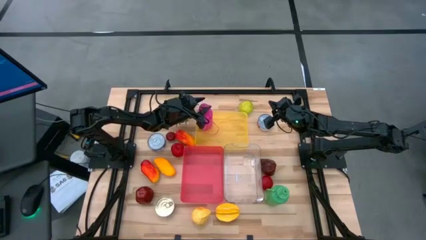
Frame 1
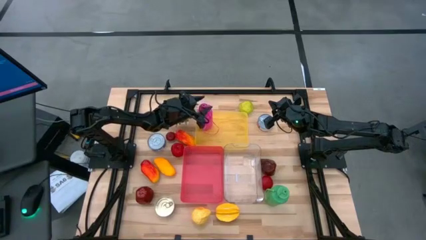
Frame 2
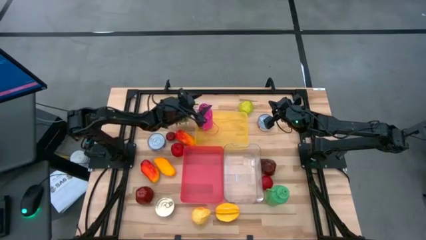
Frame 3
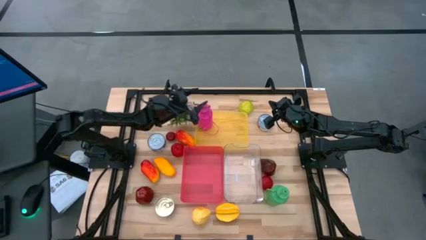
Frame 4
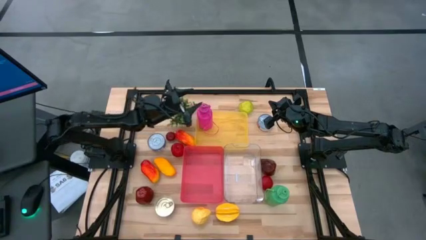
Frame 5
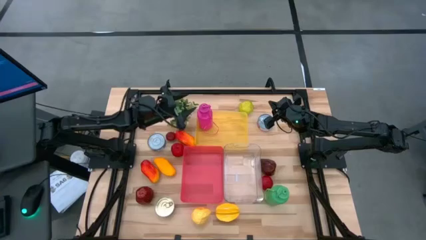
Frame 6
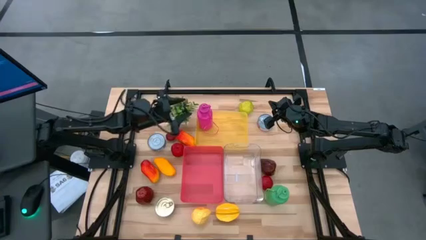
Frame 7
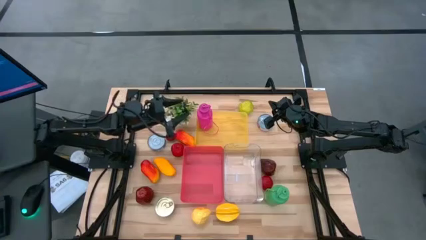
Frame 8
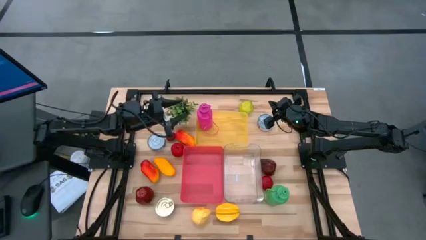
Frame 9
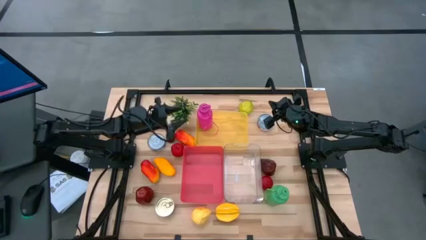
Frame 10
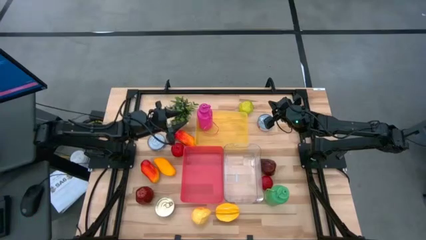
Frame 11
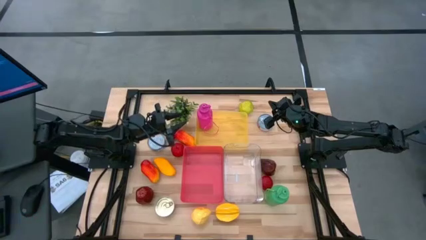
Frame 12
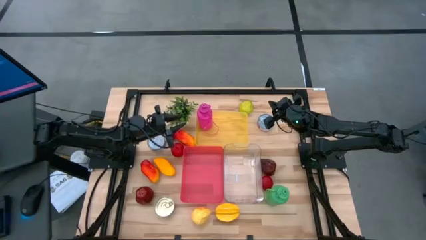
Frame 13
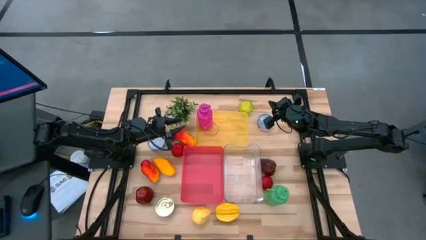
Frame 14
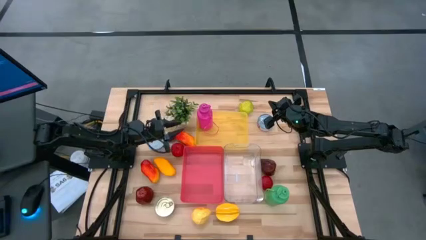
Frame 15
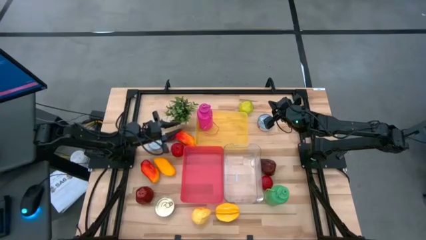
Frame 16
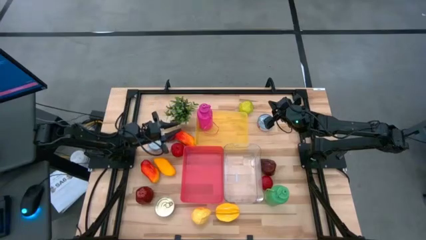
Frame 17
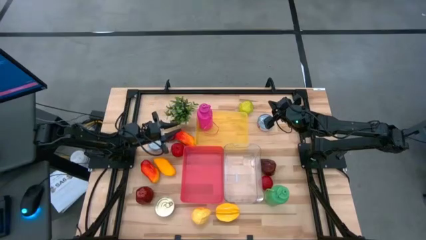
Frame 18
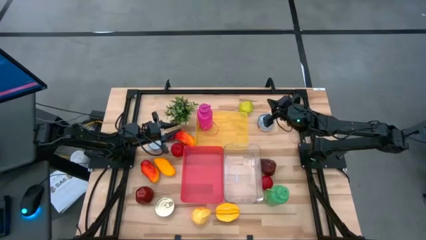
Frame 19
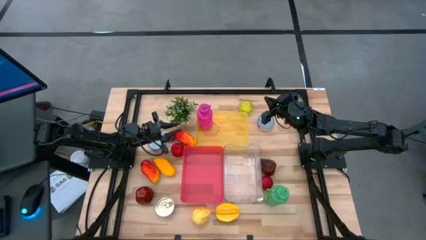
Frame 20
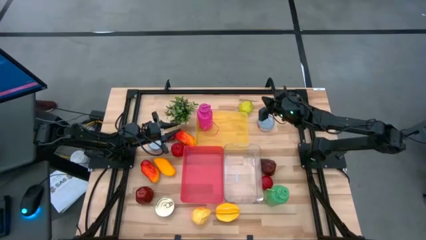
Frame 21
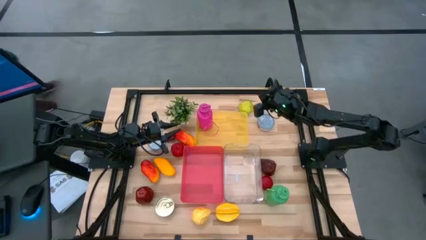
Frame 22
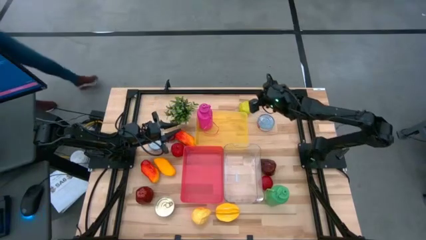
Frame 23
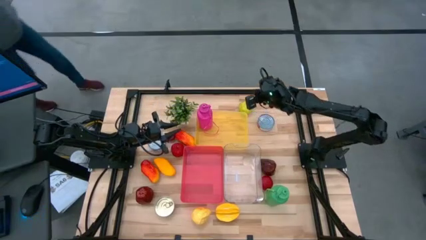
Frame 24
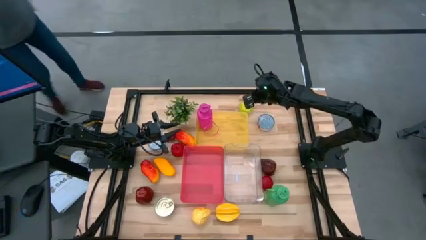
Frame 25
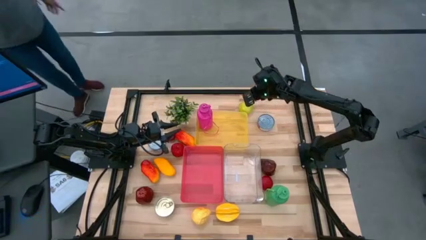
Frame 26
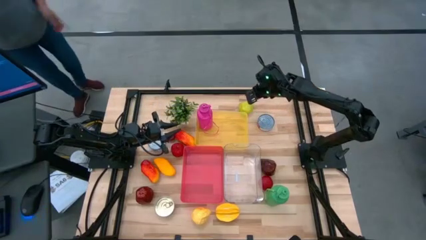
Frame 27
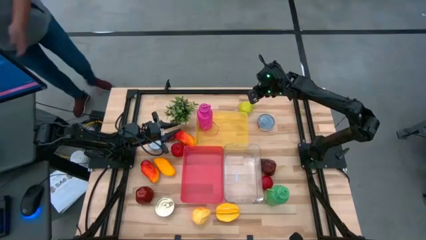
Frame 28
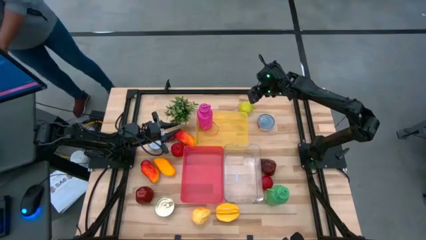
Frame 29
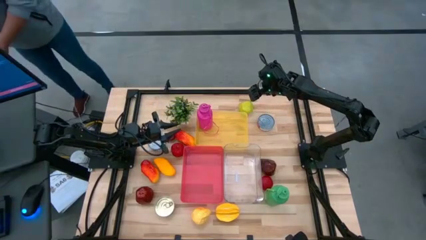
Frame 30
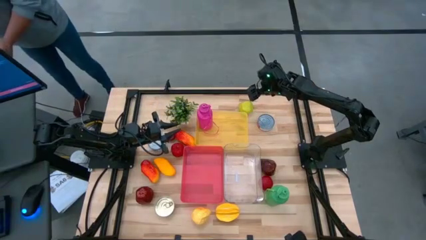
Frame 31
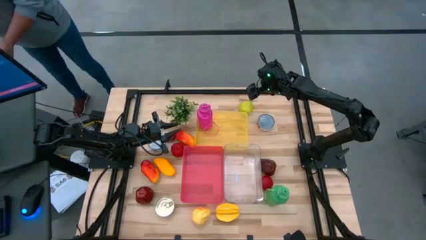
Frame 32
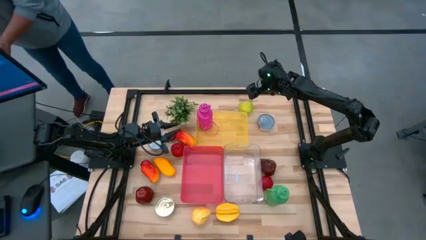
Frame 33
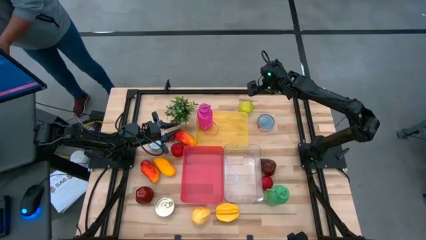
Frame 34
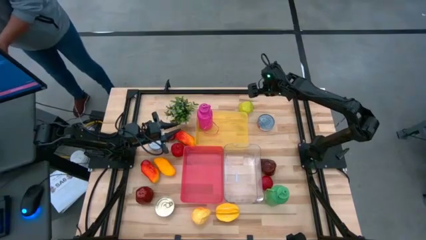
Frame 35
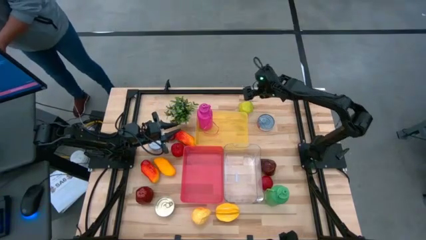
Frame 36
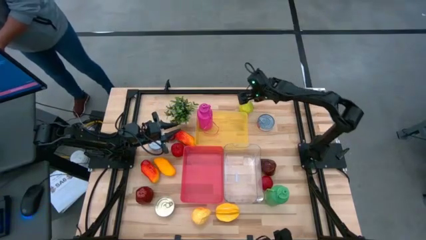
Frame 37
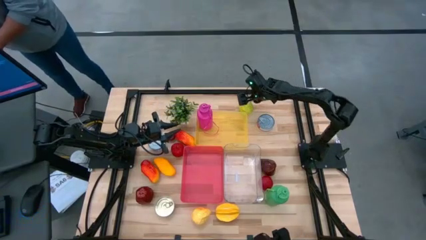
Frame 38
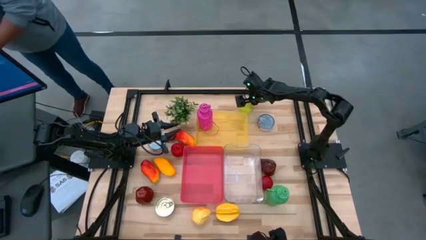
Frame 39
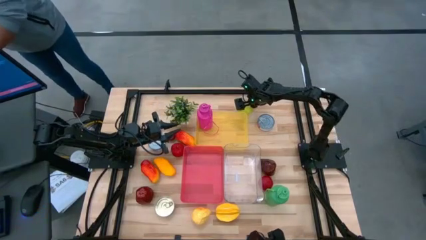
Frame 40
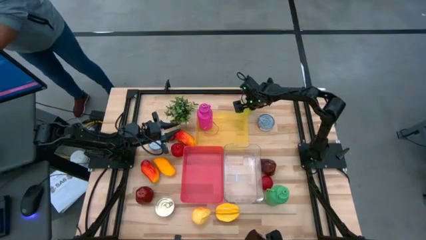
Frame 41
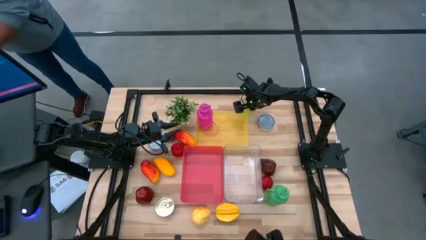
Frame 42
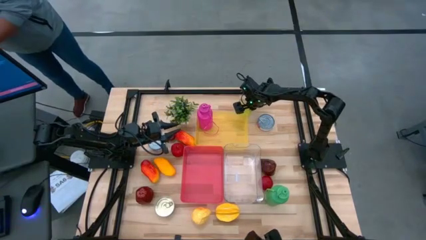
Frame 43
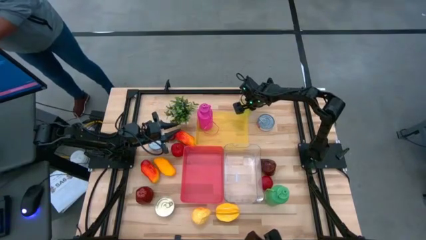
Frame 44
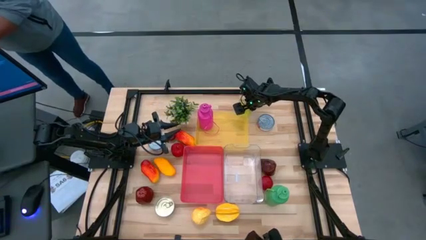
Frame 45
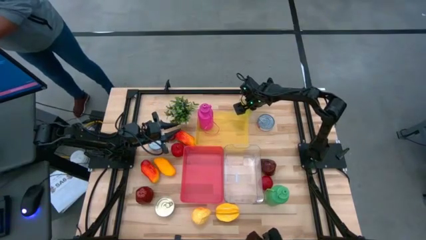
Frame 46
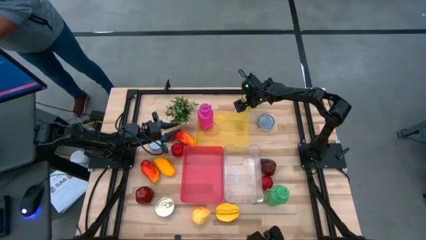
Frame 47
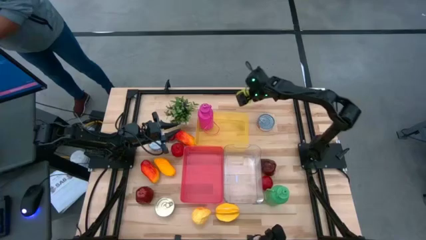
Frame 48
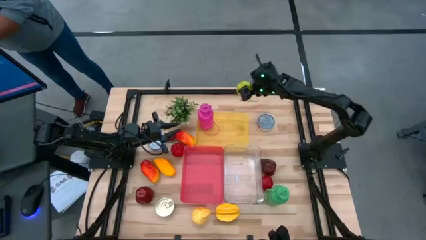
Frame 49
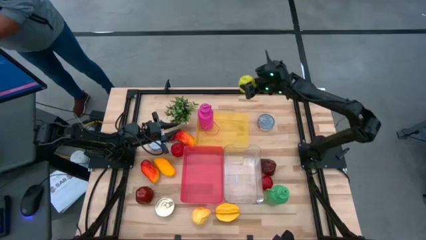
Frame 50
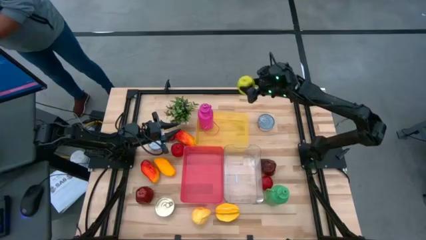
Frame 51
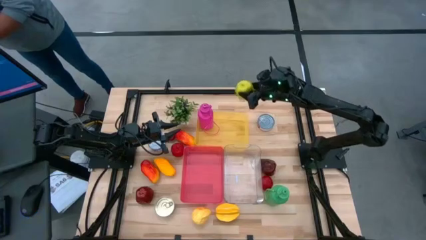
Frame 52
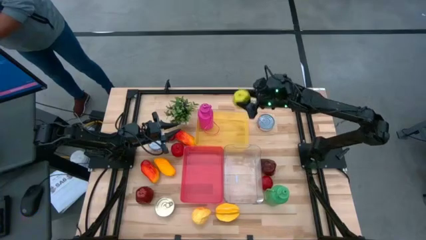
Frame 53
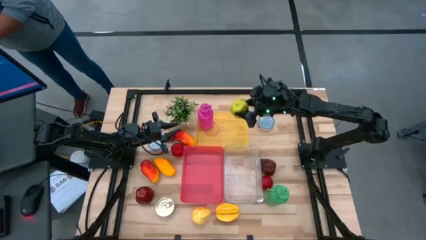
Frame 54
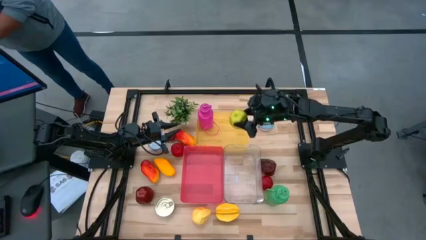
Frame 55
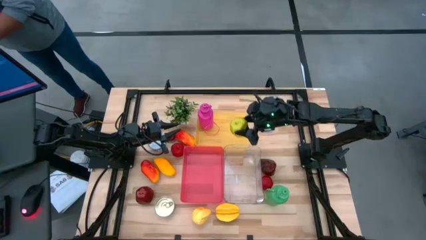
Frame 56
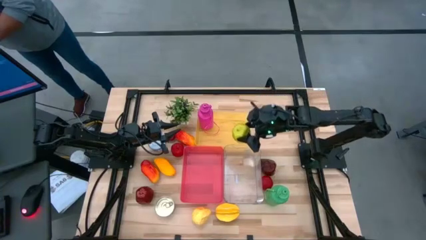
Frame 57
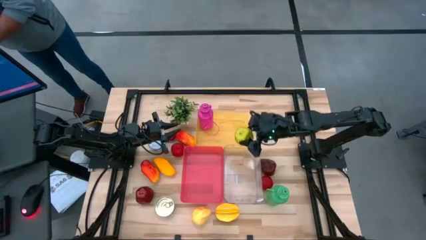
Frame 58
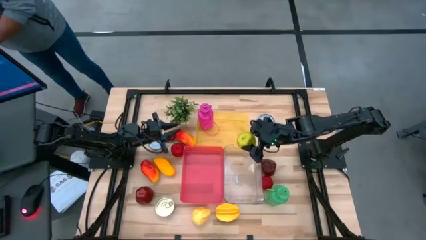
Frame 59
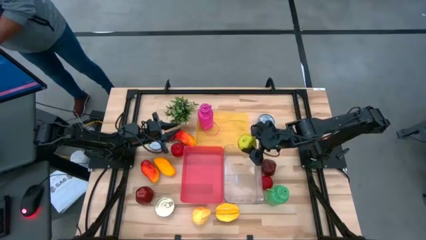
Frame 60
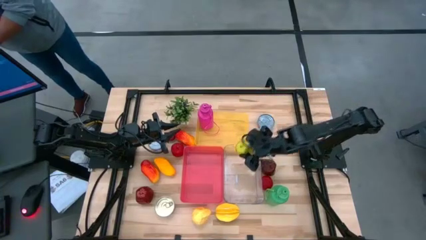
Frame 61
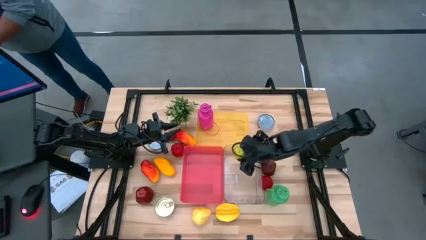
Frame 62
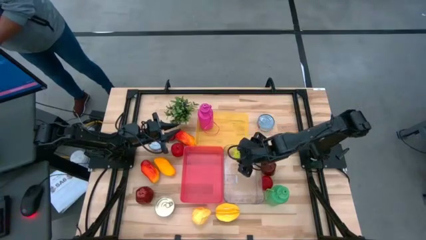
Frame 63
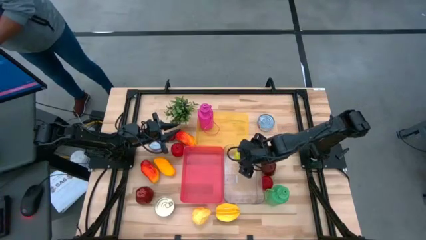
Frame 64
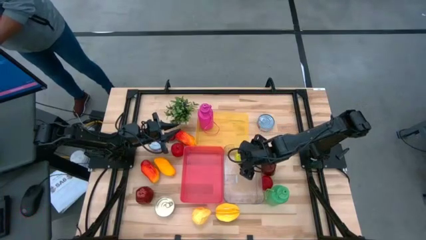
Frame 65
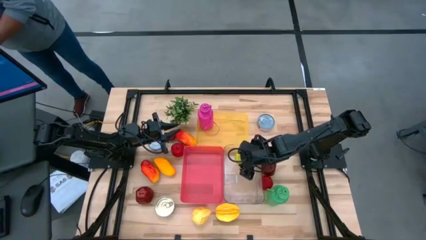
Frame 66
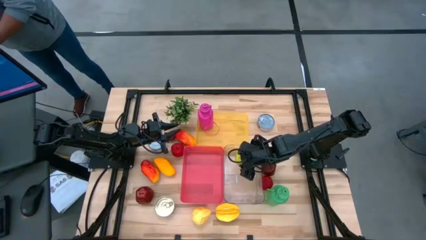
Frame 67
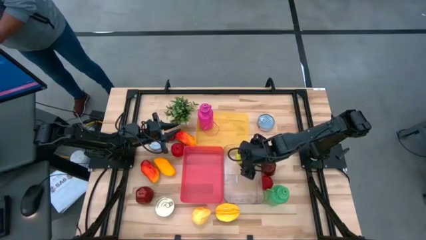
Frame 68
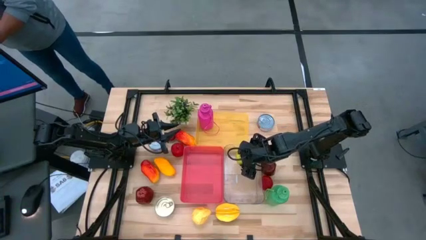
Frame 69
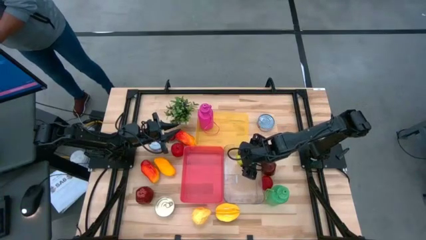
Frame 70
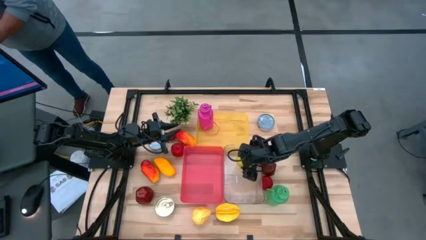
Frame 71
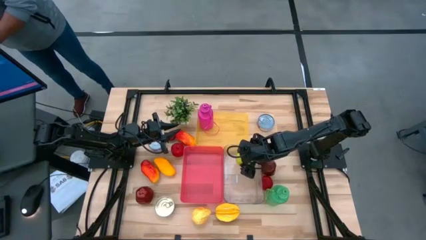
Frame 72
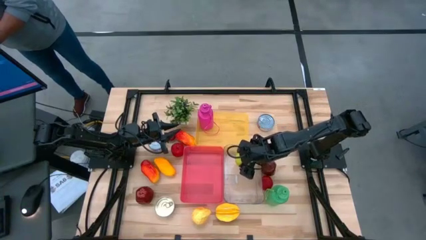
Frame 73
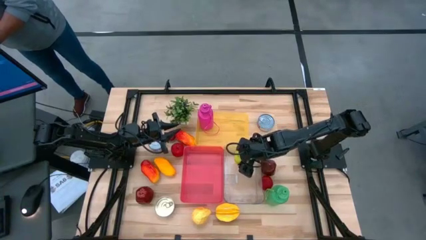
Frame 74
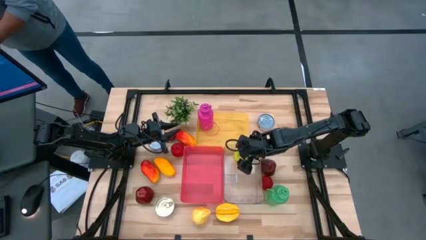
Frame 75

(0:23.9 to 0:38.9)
Task: Pick & Place Food Item
Put the green apple into the transparent bin
